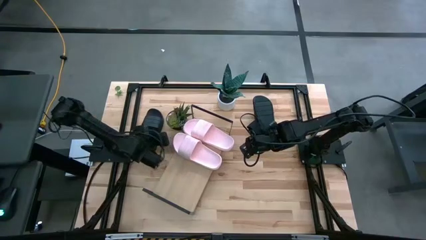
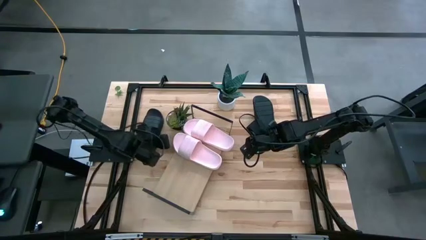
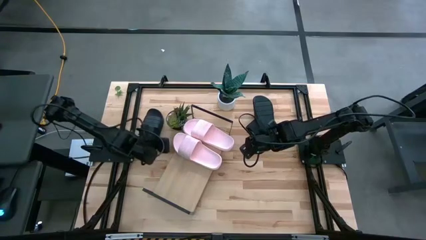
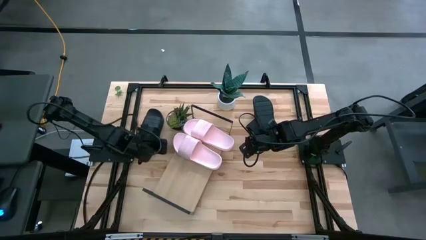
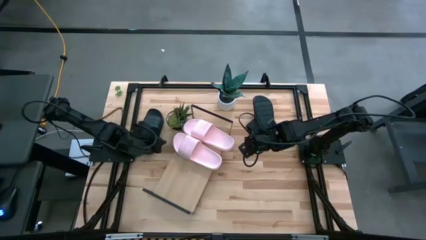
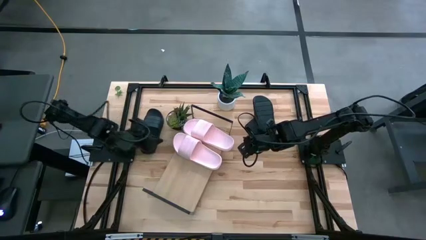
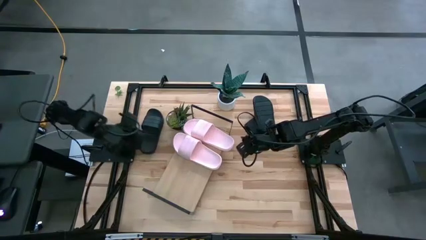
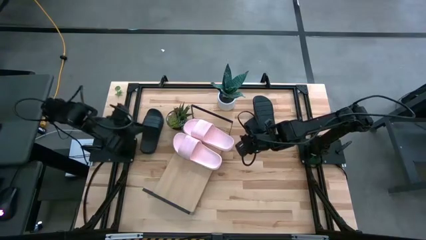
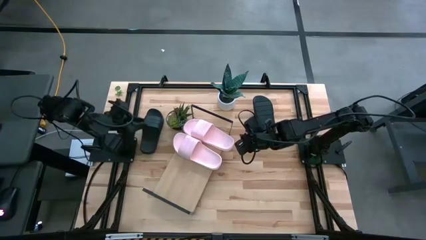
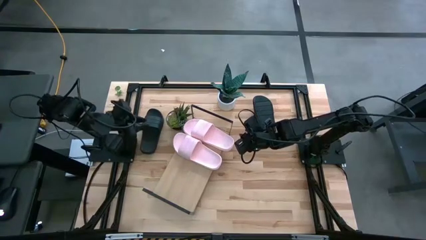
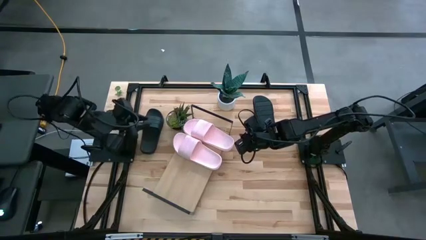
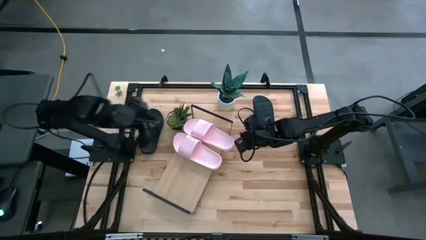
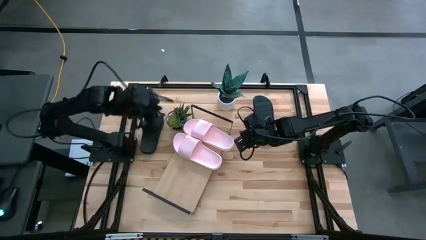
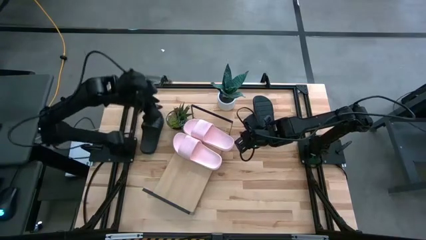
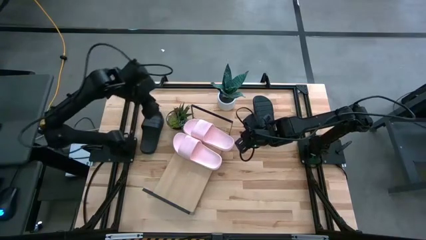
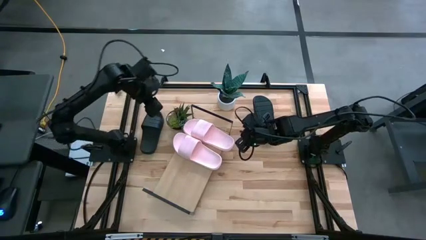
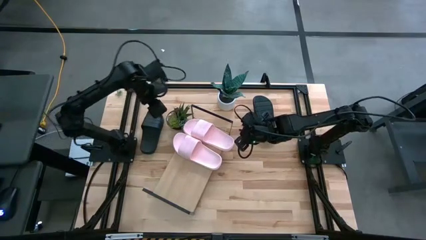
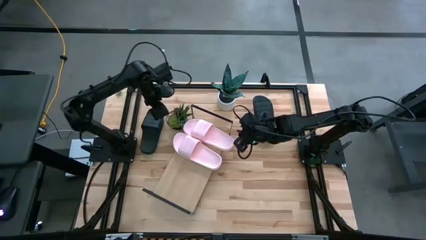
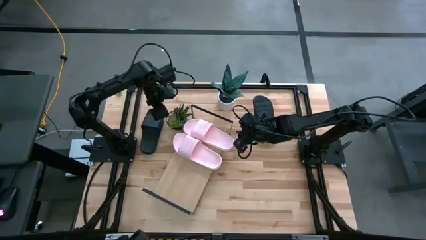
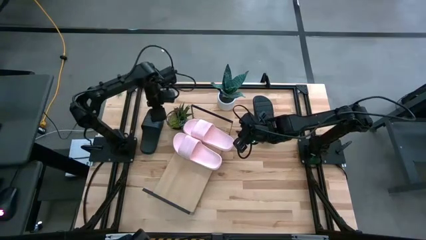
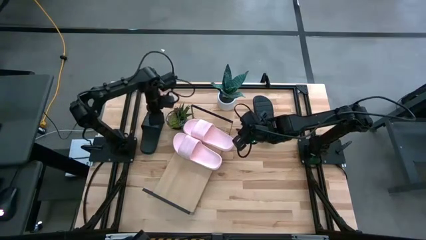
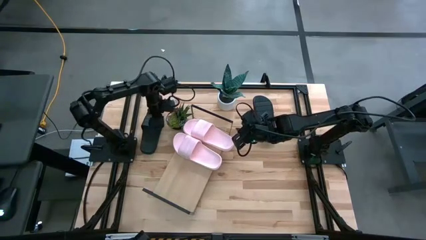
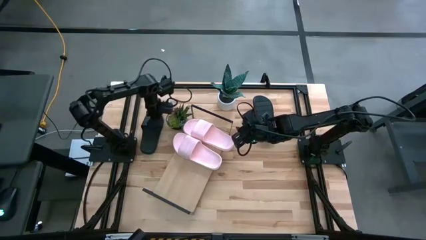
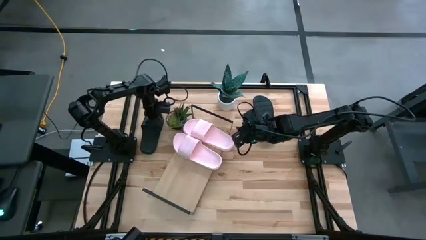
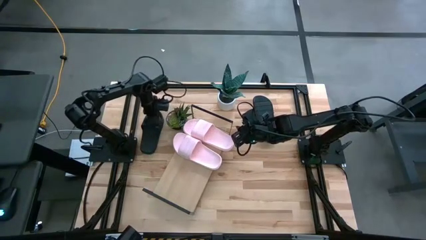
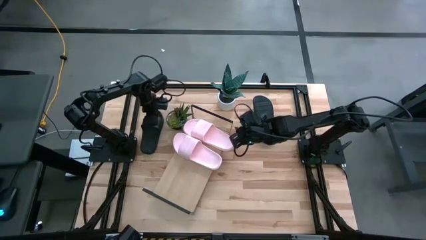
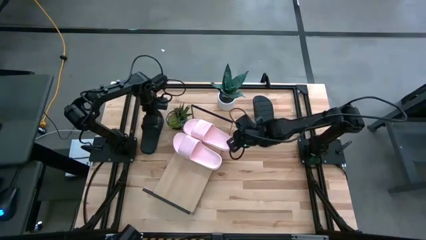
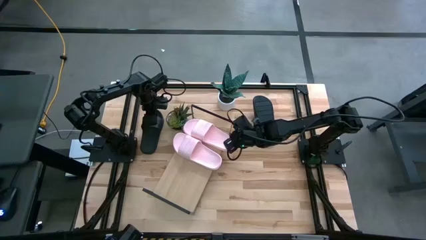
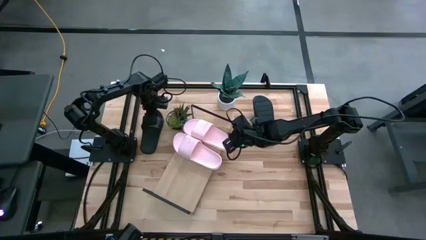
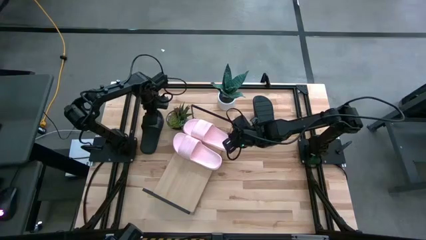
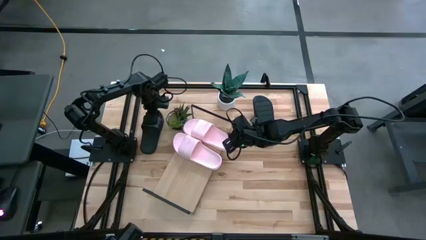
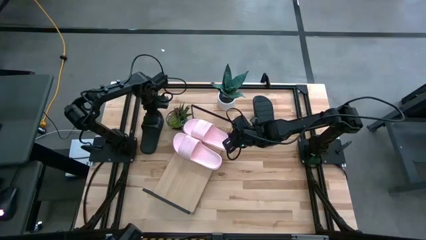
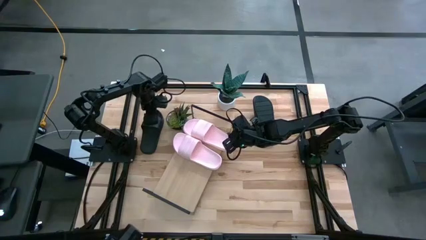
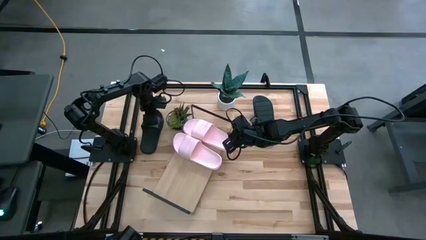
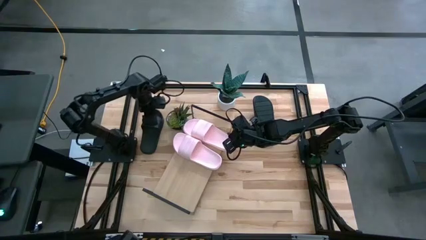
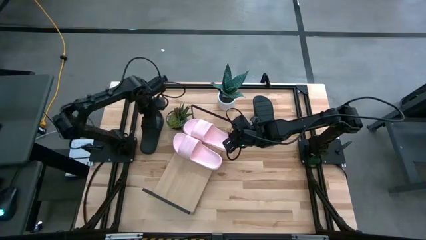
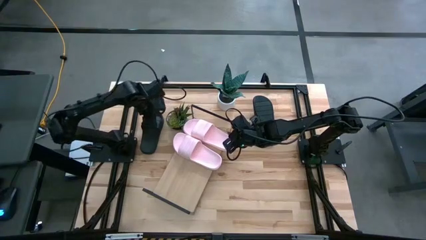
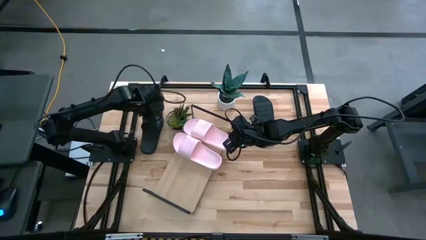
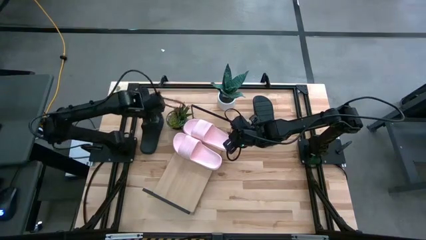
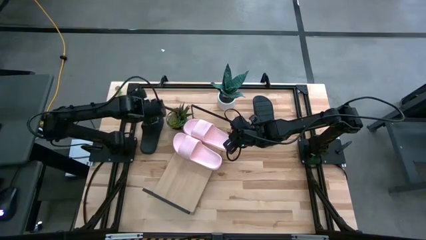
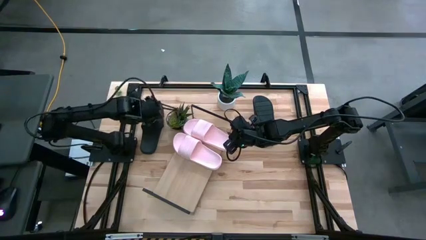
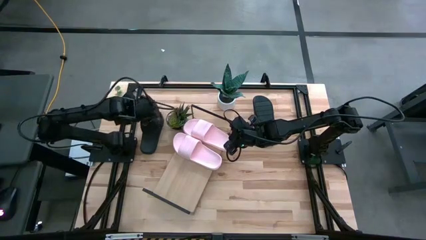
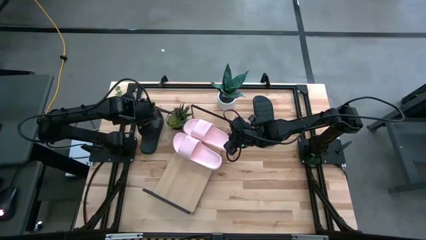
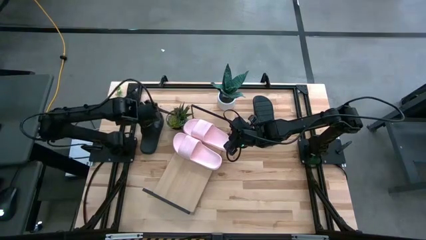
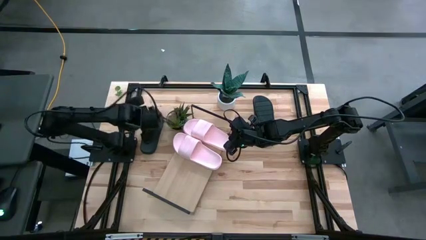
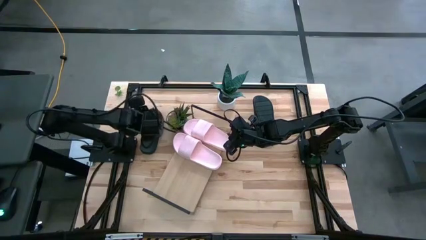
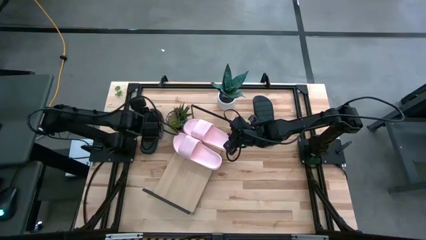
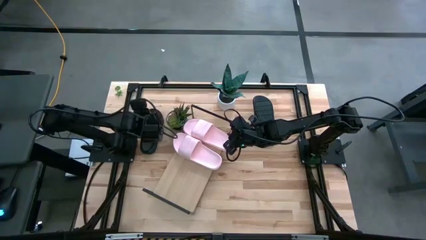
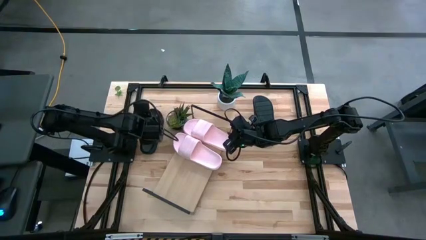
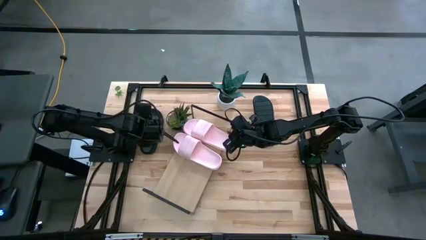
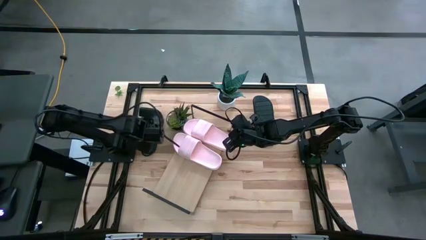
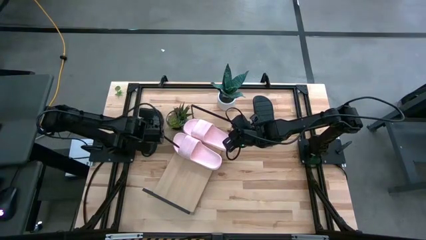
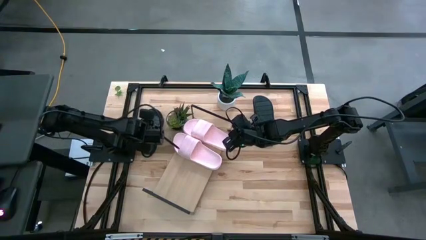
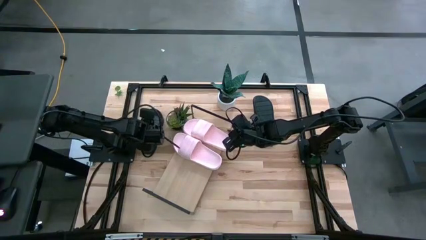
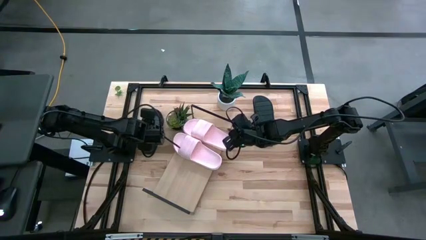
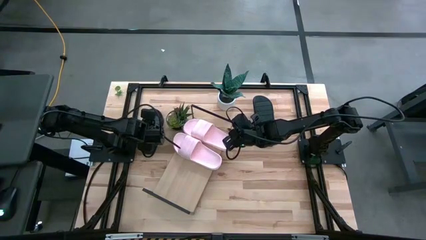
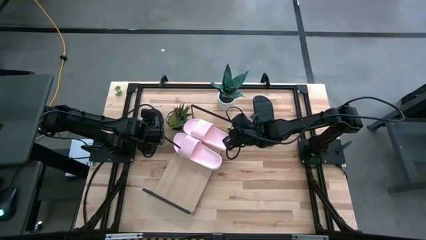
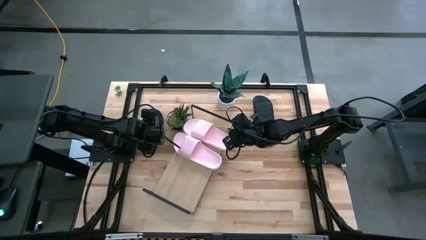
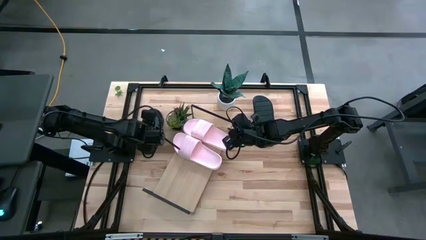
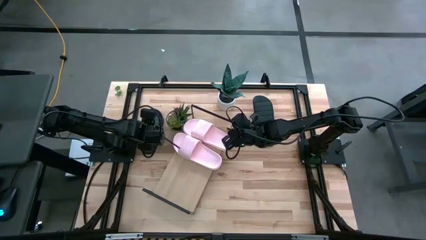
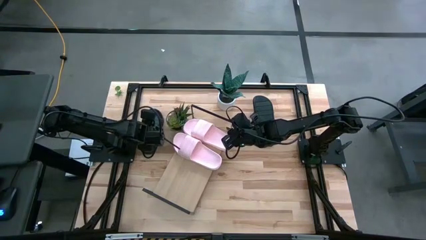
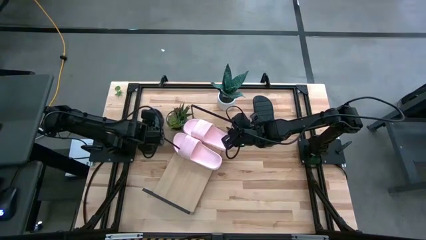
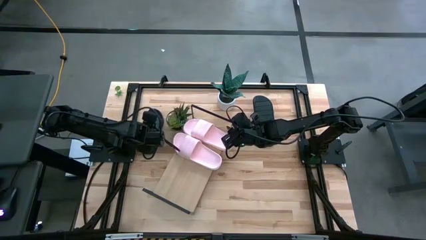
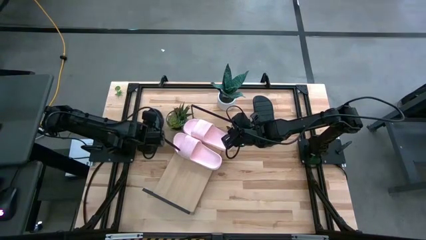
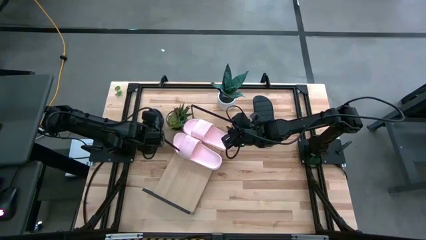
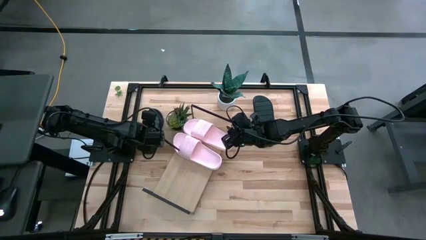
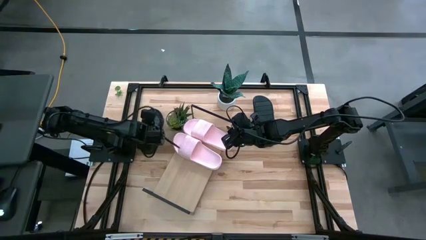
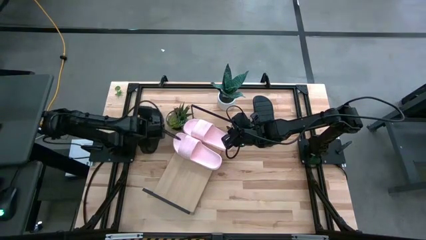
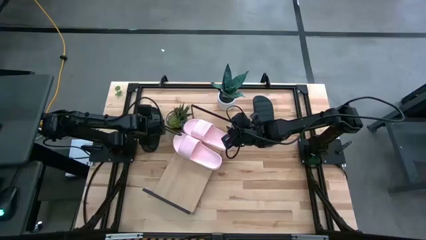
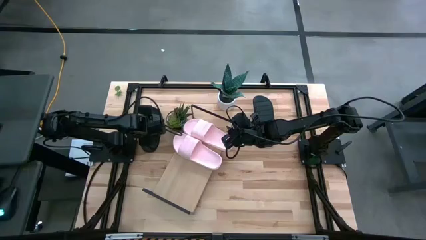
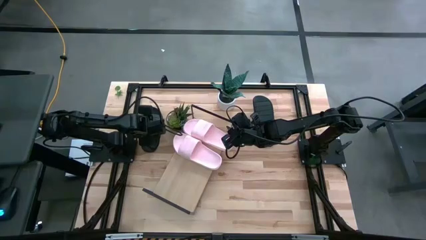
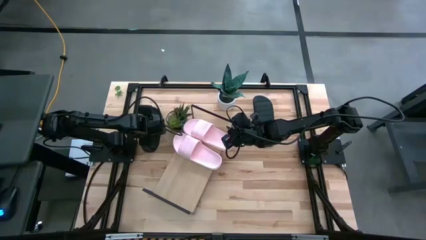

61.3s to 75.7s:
Task: Pick and place slides into the shelf
Put the left black slide on the shelf

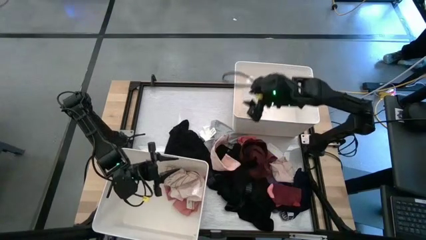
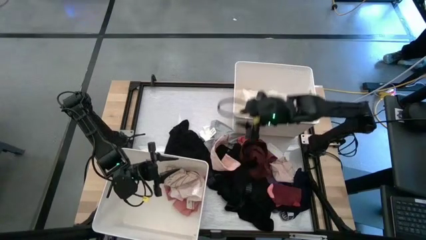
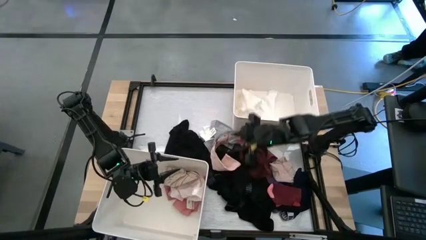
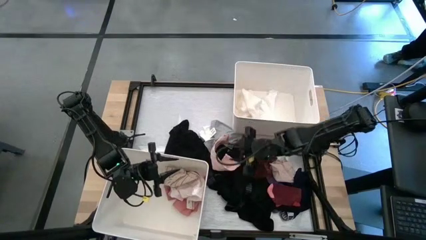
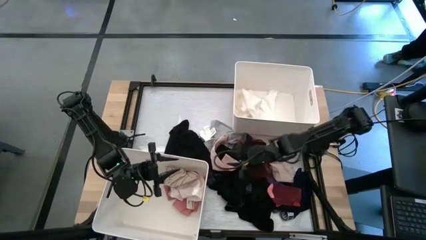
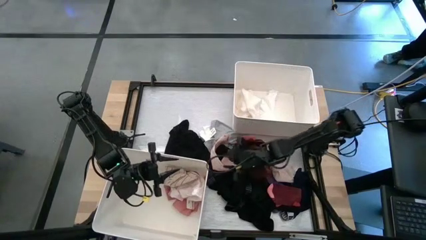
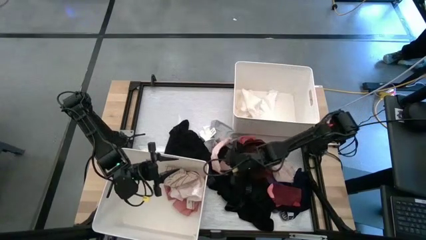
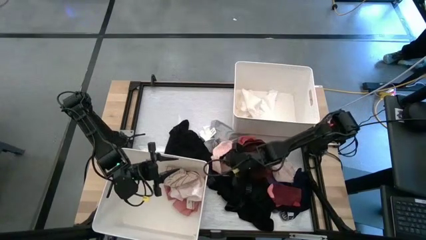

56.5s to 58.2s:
Task: Sort clothes
Put the pink sock into the bottom white bin
